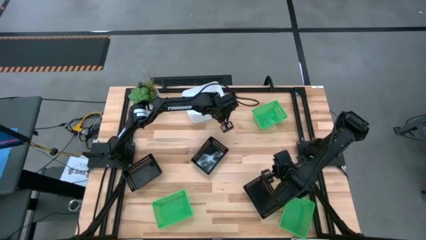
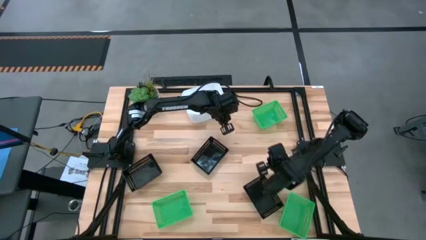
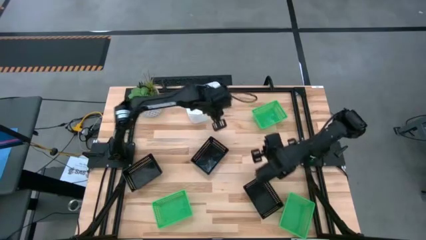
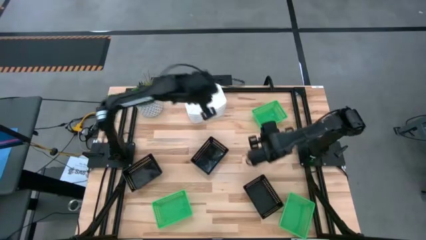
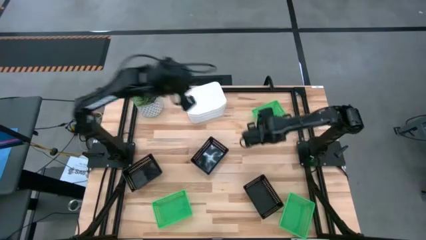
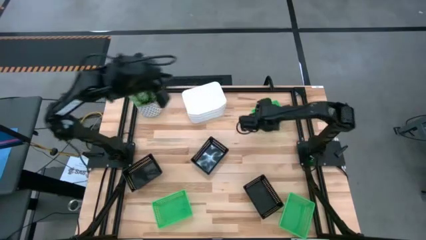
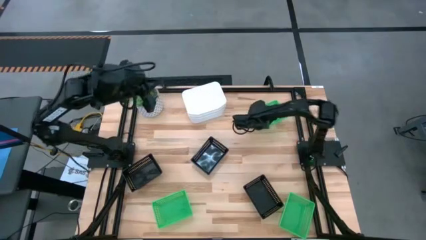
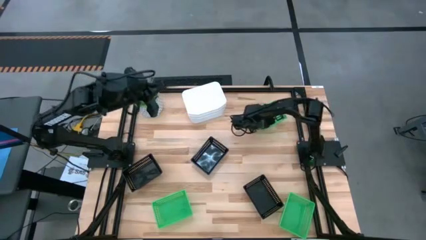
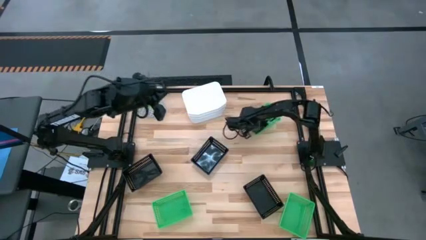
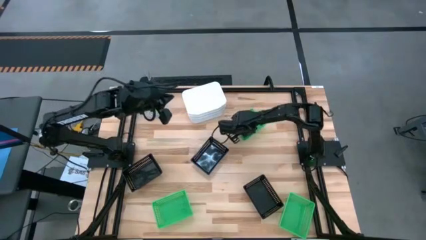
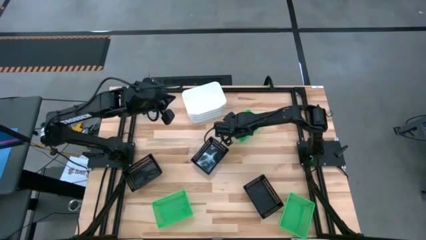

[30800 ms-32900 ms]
Adjust the top green bin

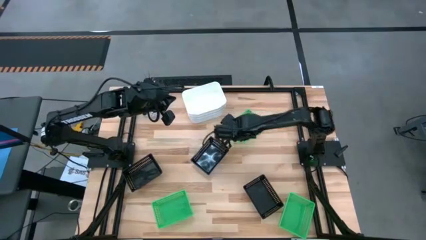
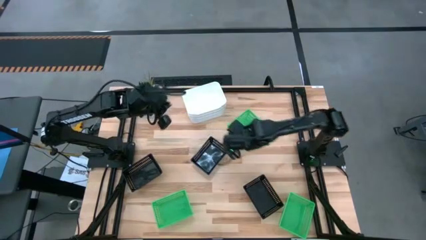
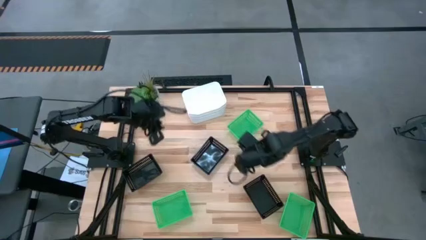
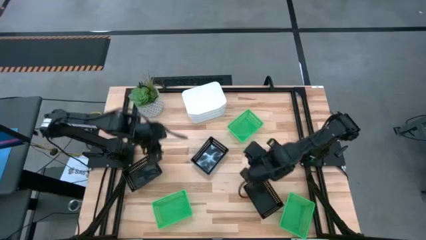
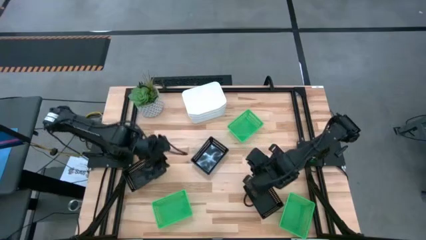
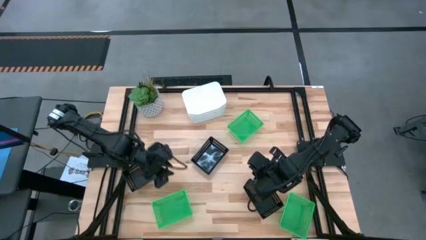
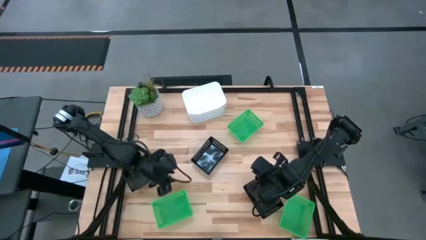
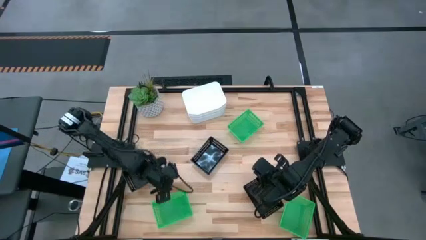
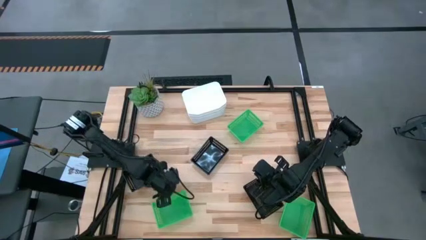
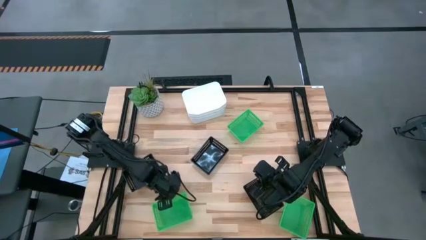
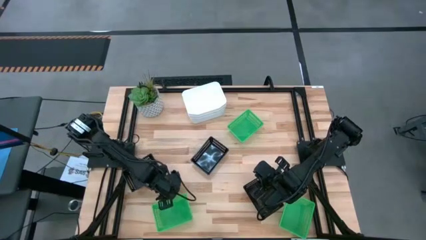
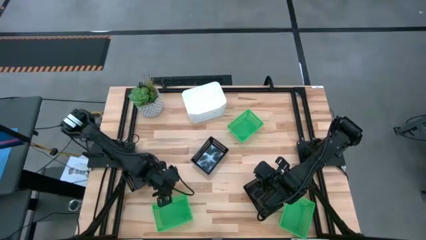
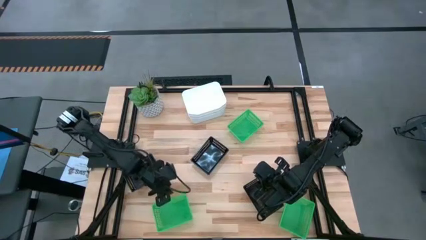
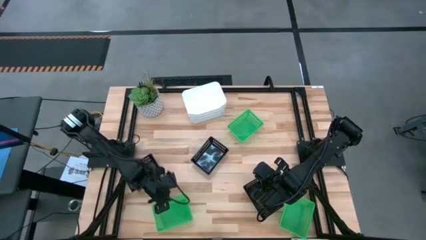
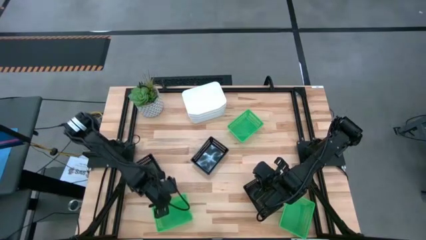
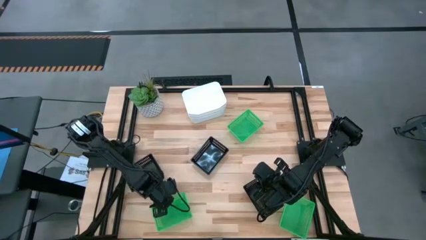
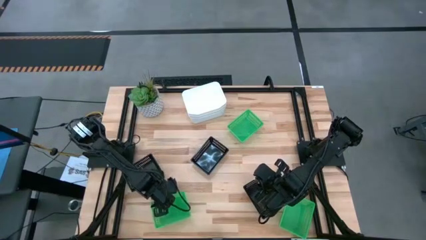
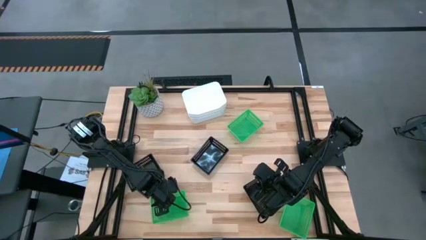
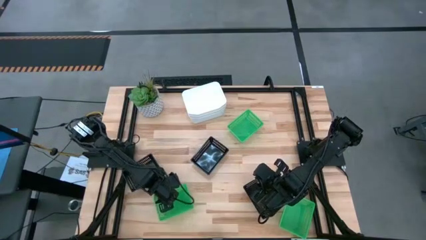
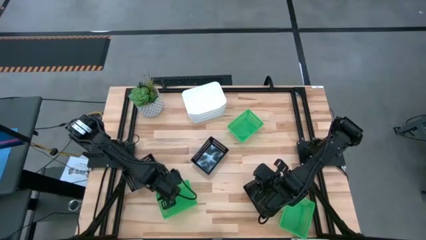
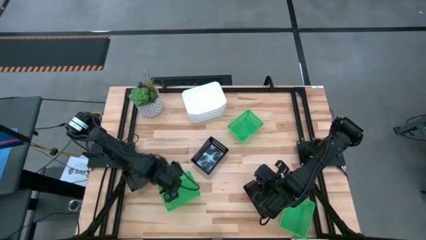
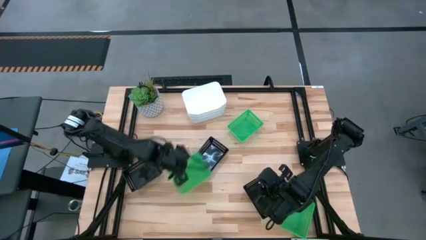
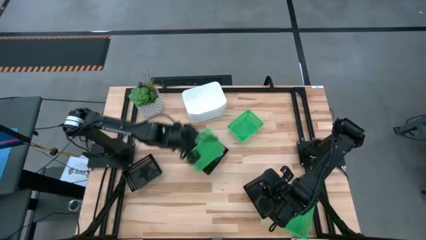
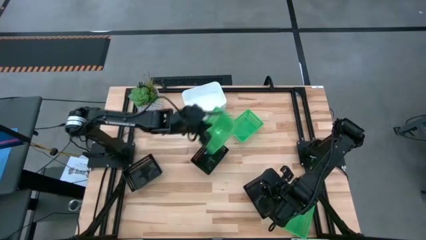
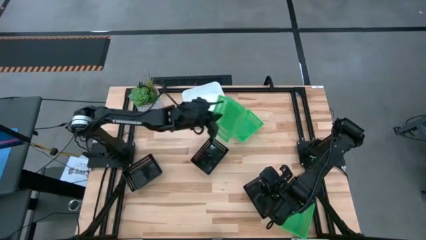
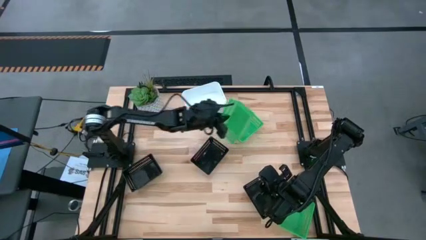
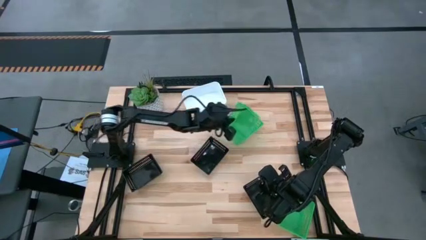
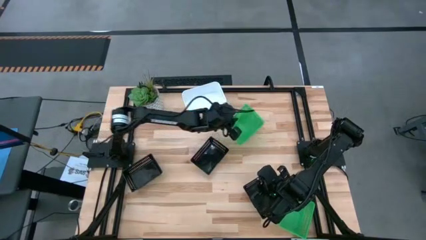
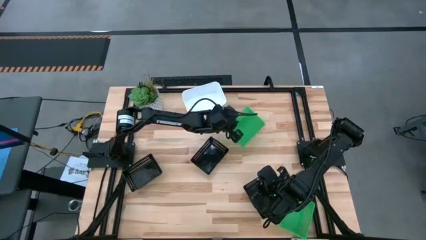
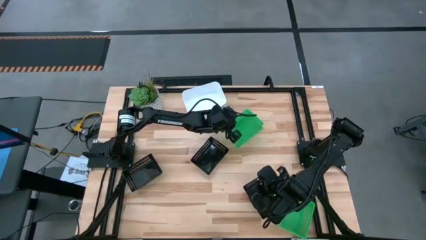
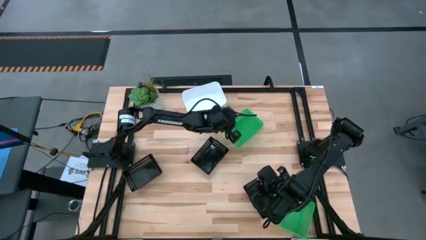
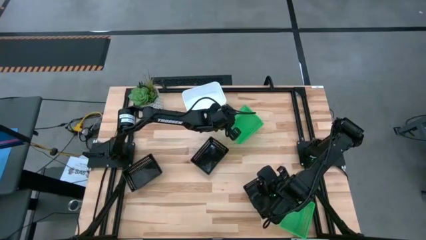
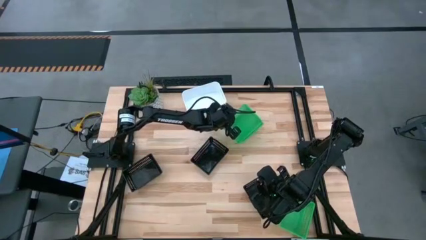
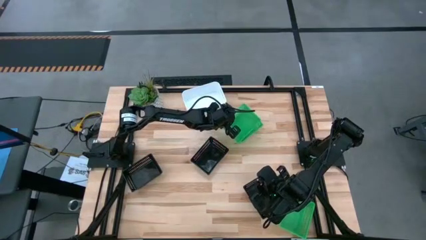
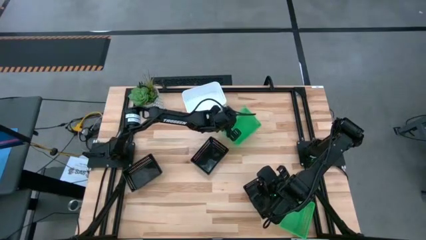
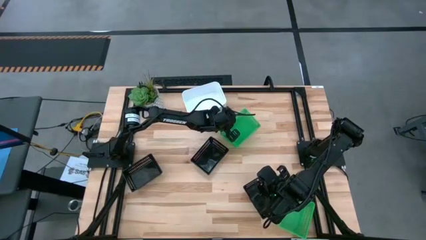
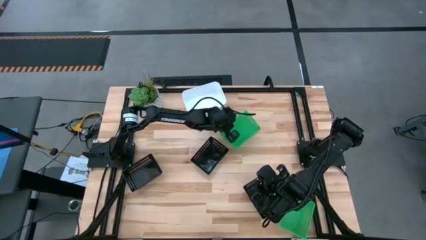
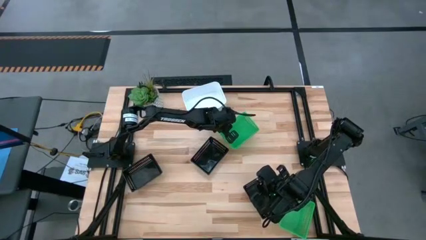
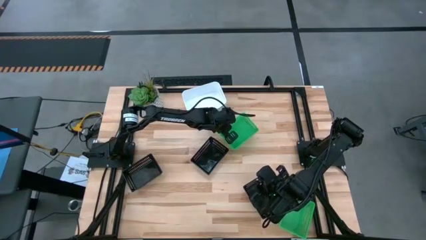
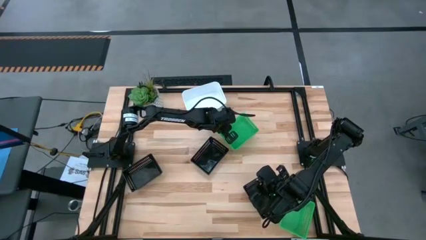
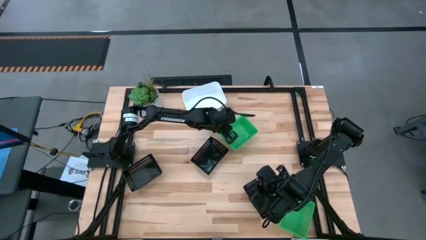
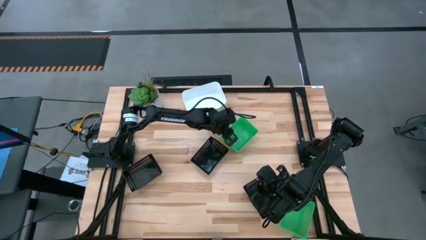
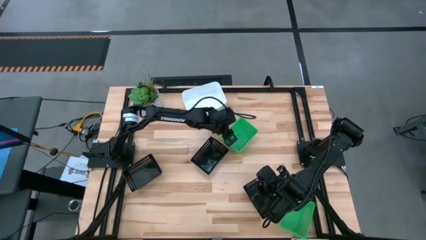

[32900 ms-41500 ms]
Stack the left green bin on top of the top green bin

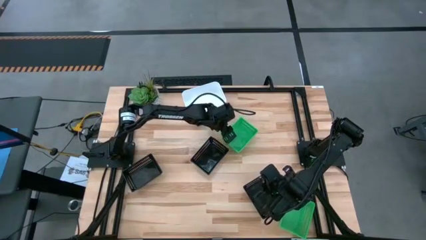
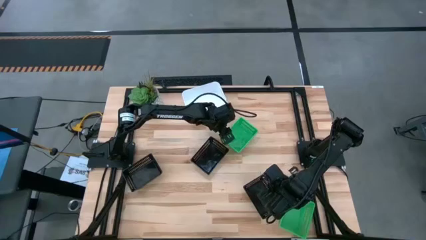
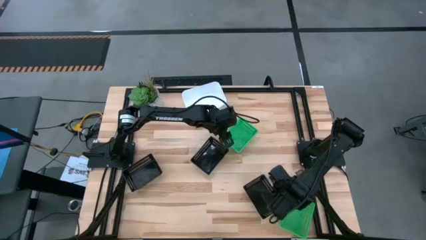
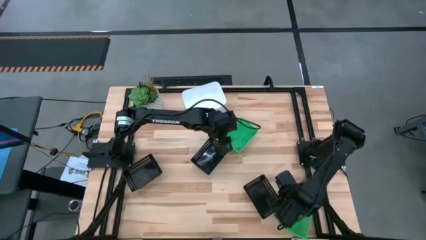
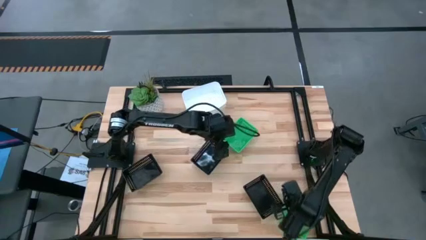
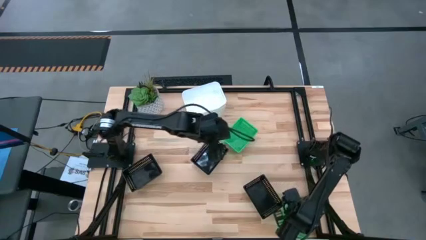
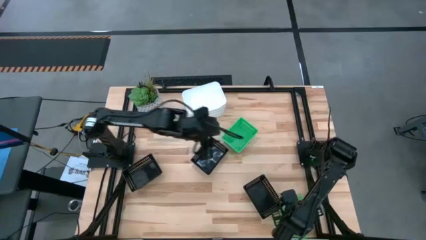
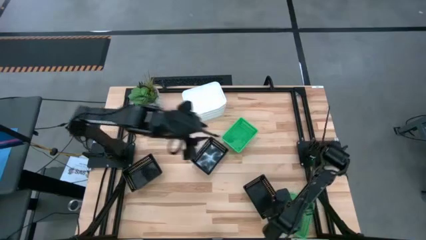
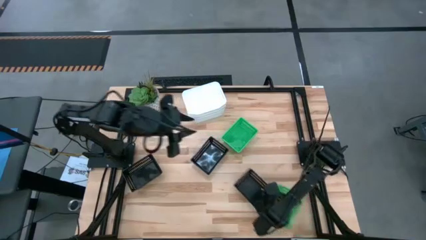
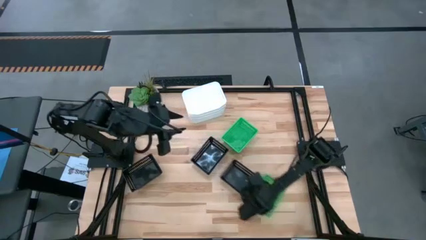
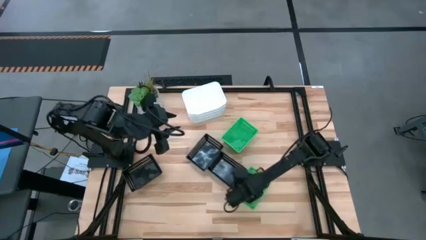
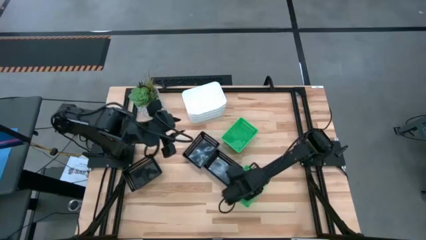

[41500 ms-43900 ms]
Adjust the bottom green bin

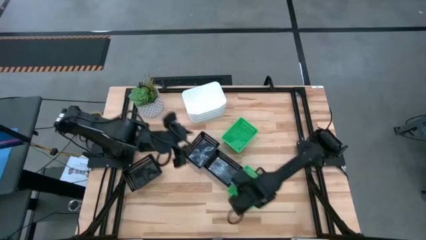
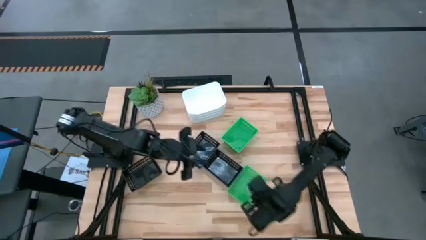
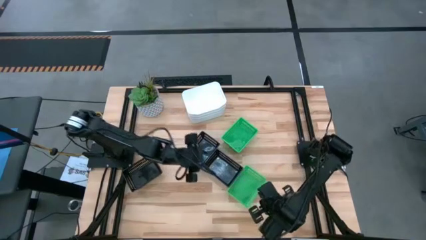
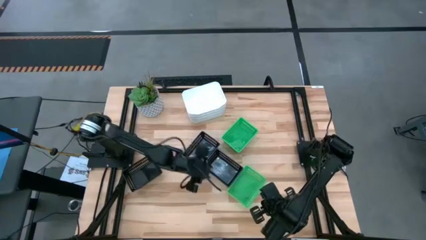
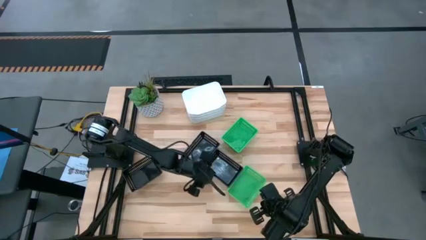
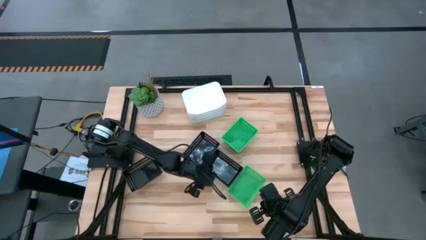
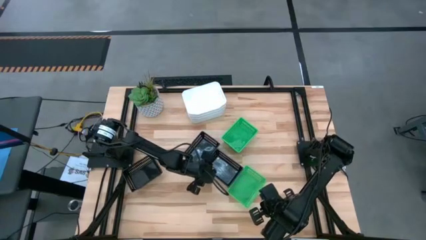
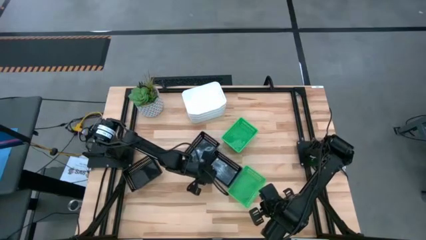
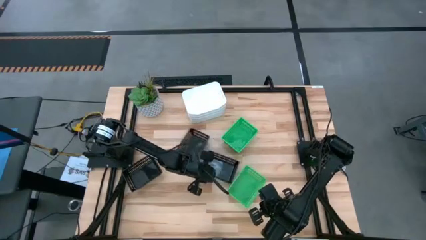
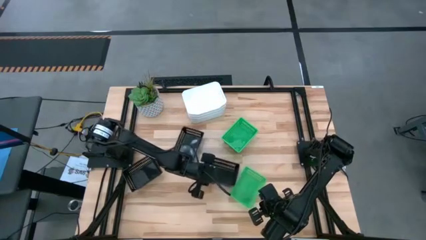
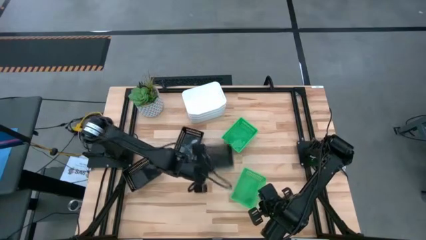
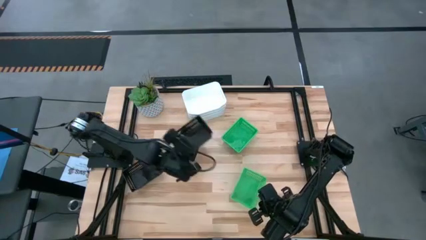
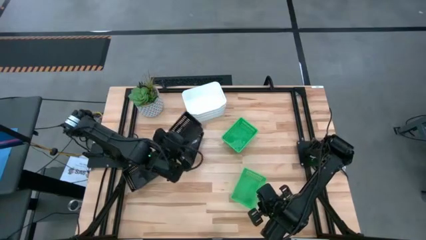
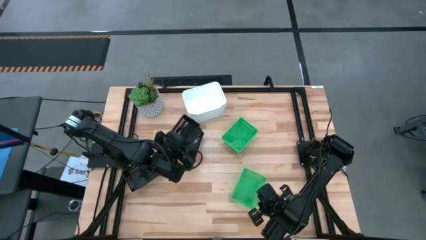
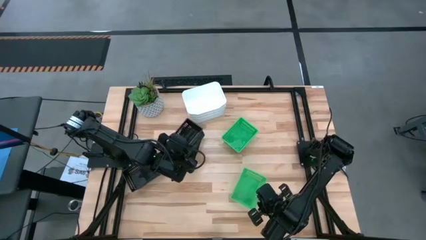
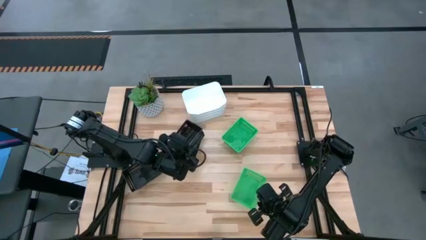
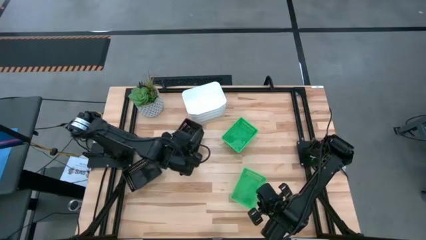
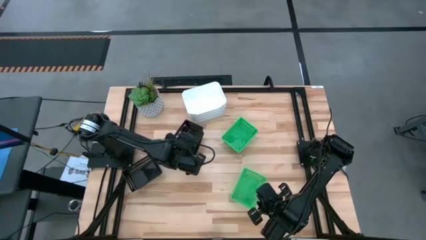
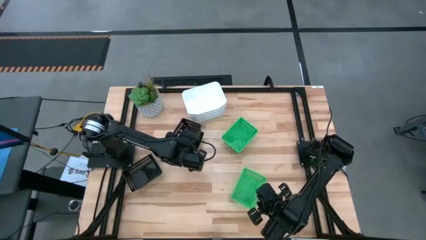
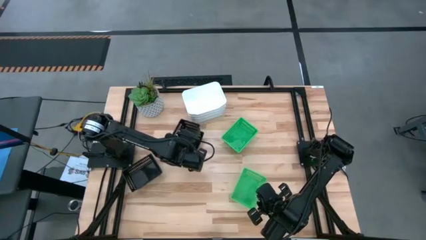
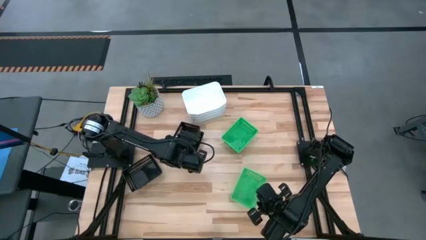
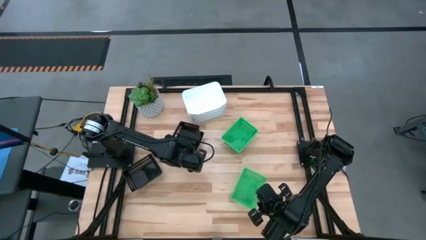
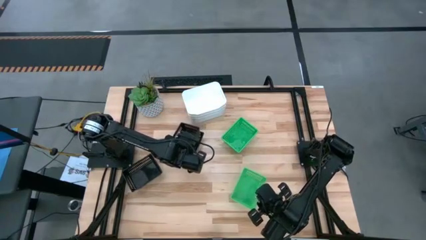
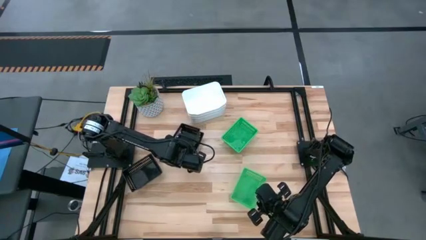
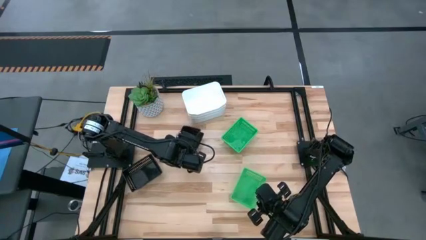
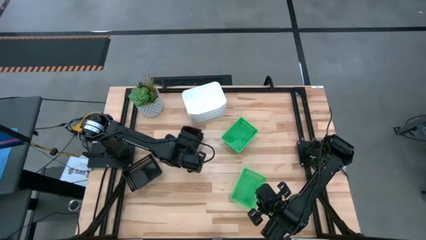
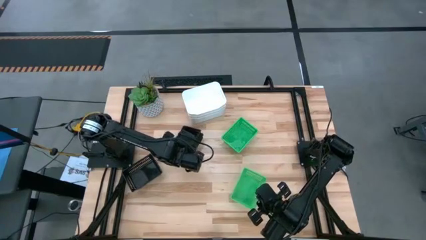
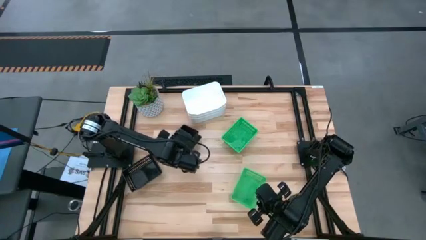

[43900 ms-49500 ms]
Stack the right black bin on top of the top black bin
